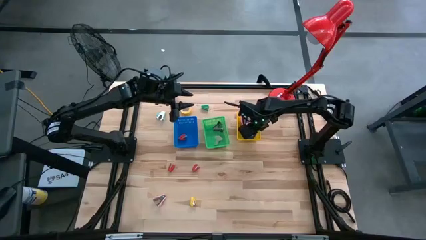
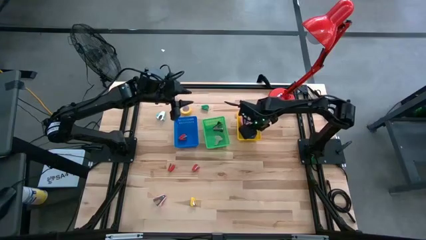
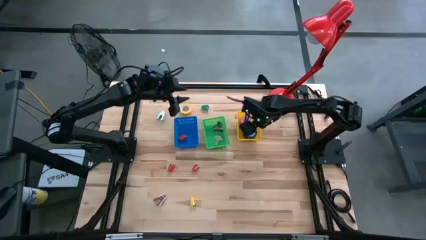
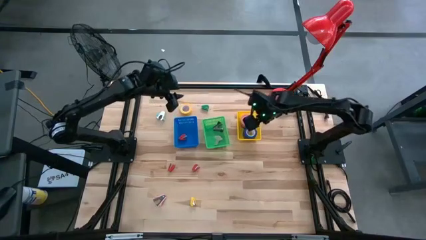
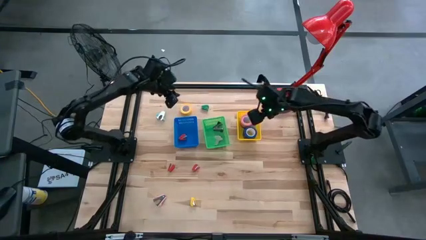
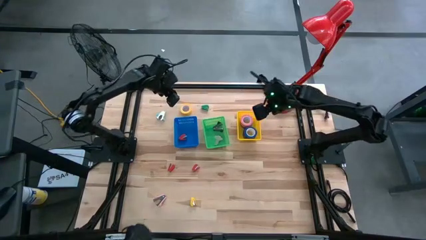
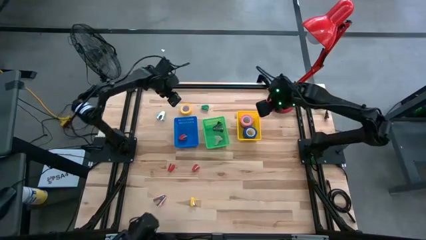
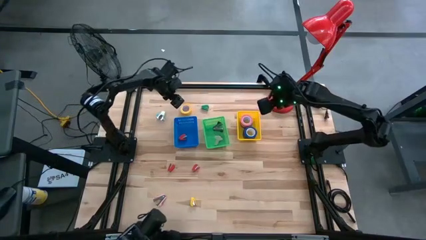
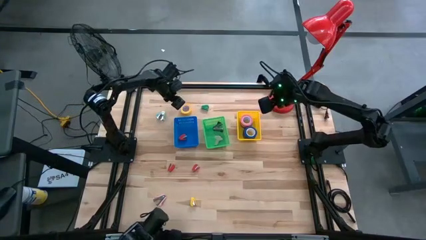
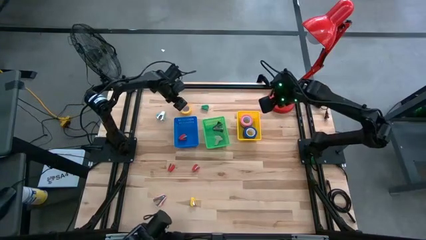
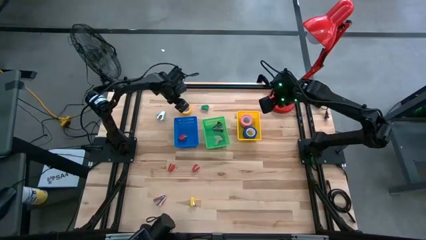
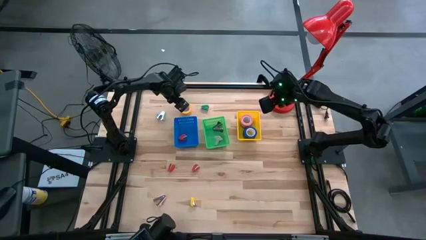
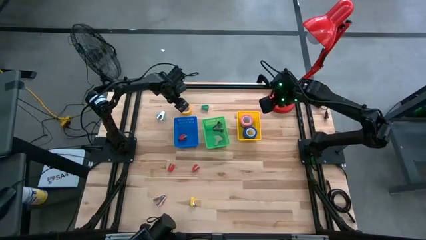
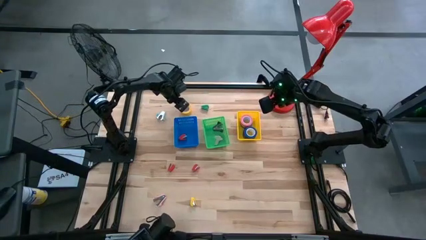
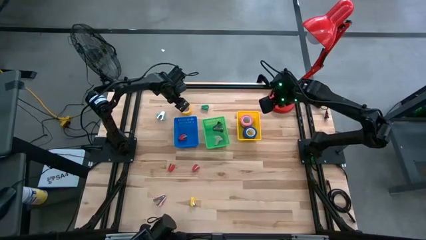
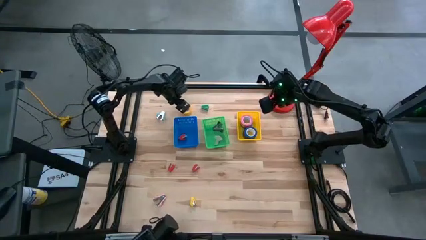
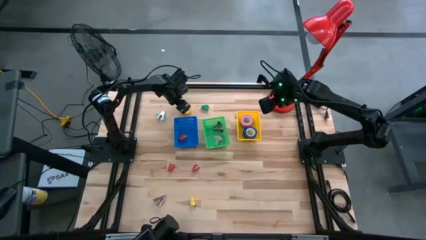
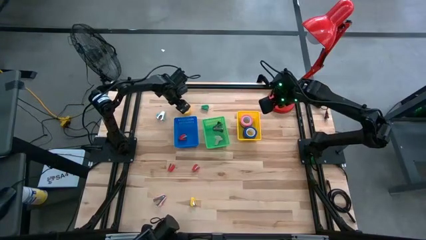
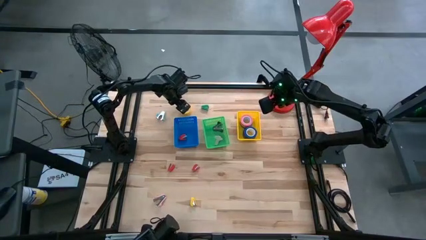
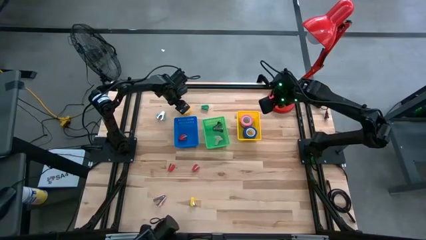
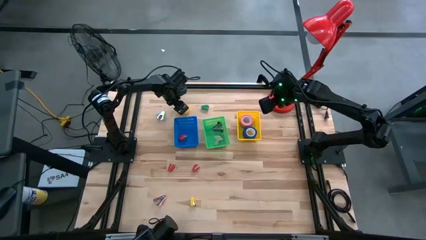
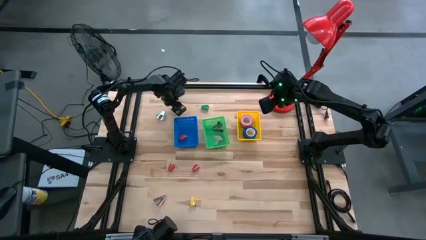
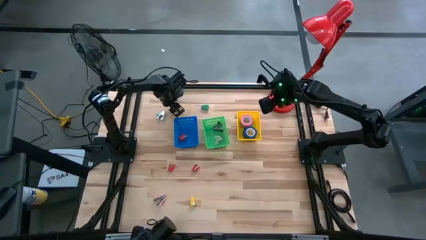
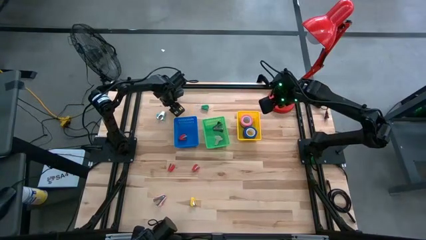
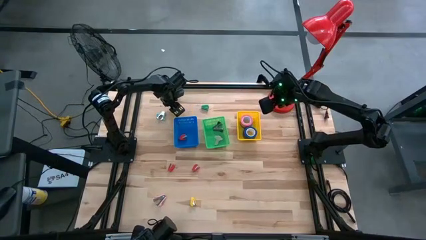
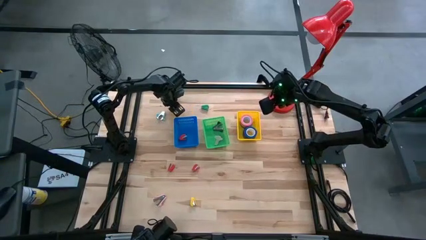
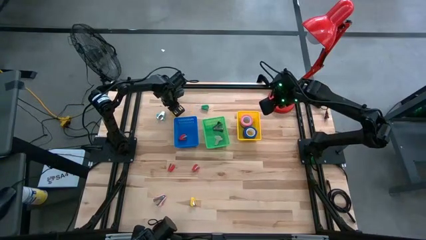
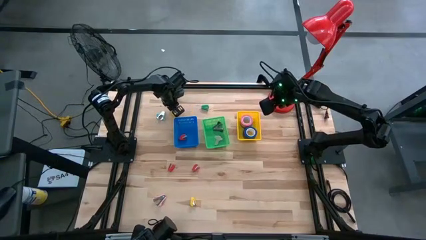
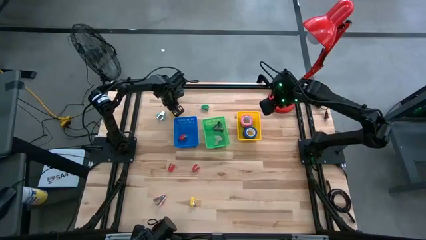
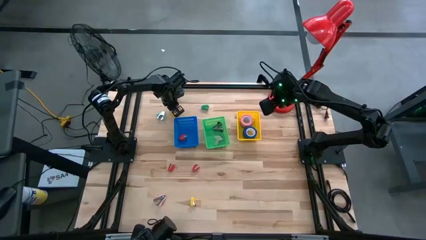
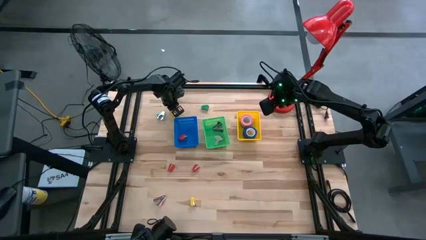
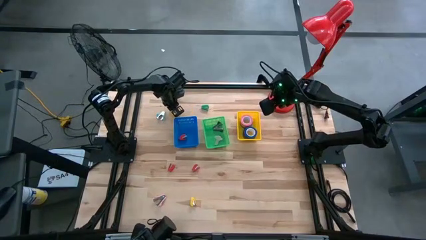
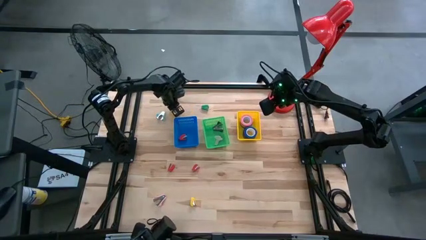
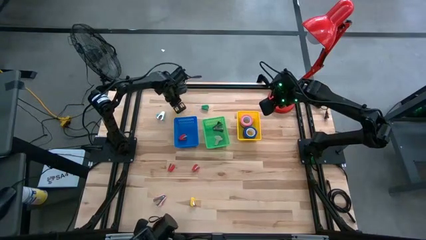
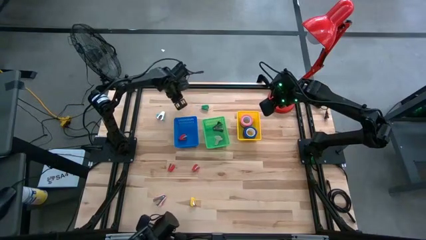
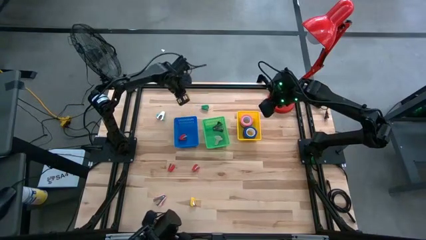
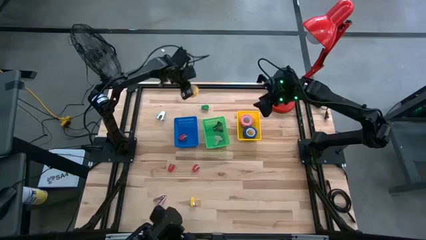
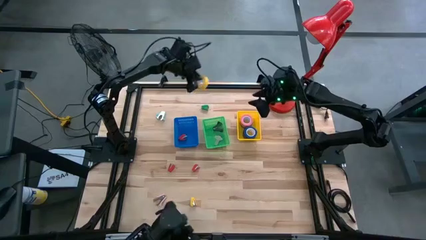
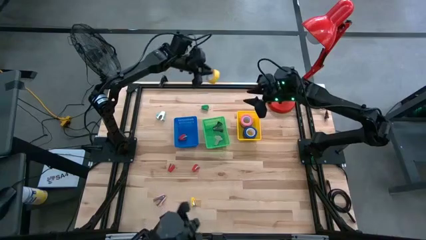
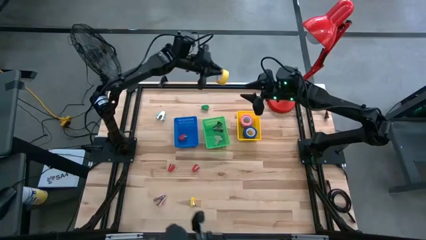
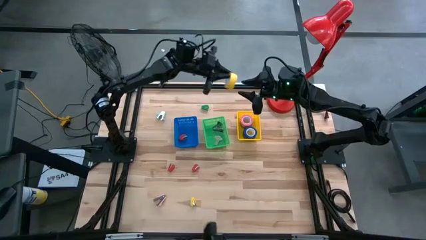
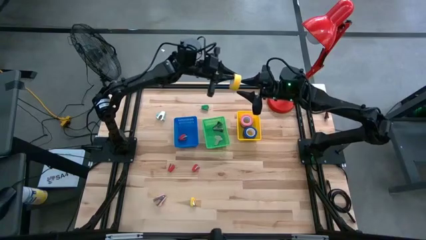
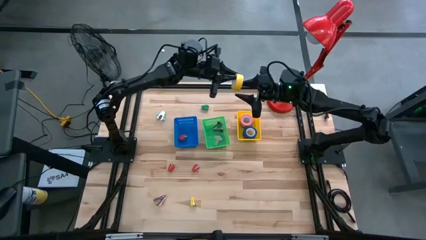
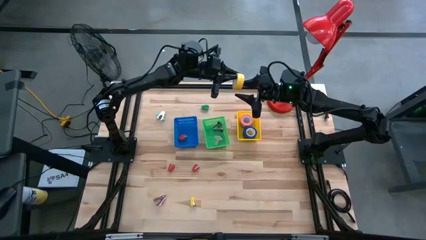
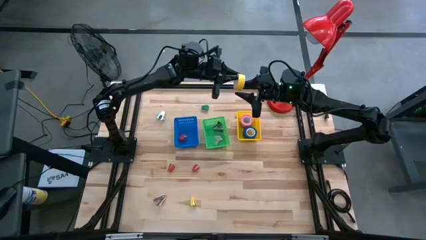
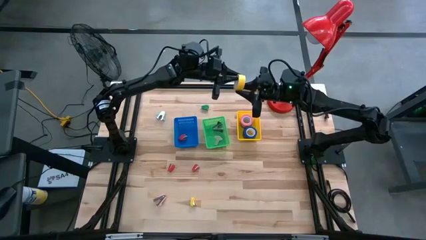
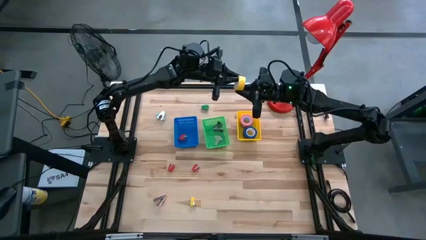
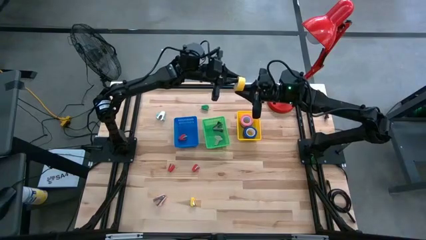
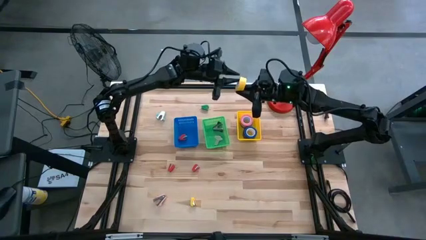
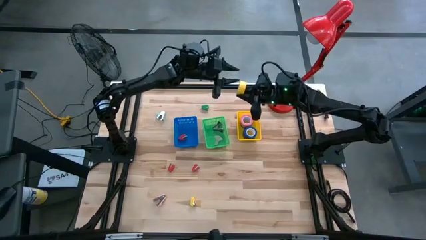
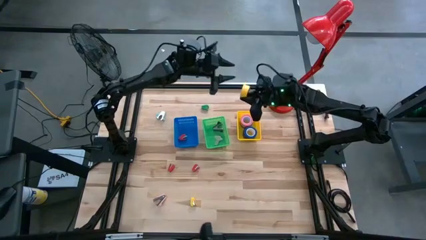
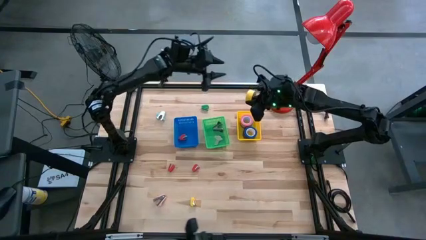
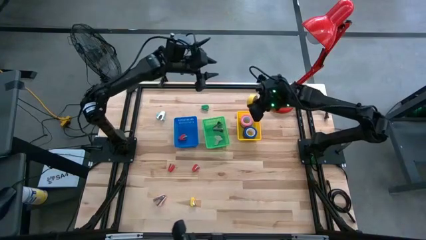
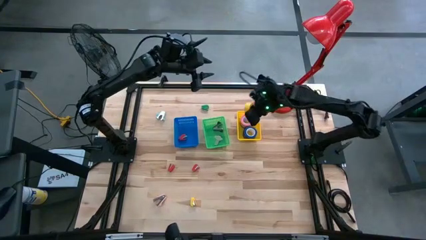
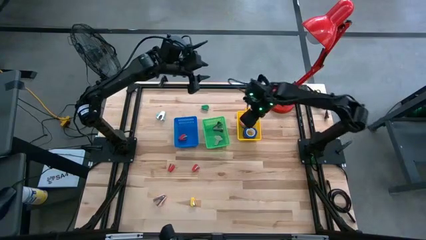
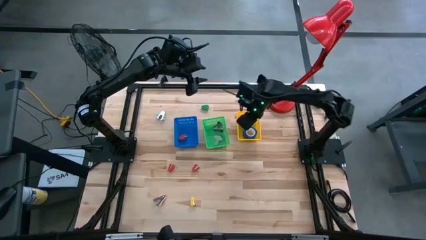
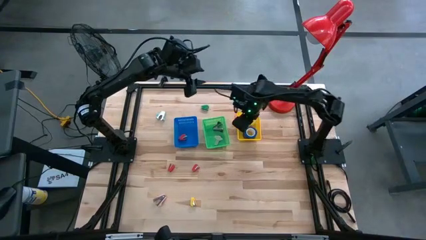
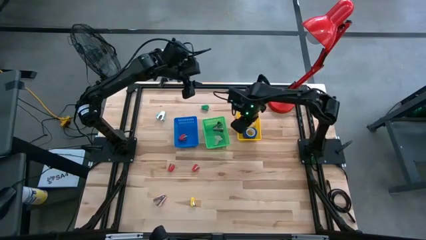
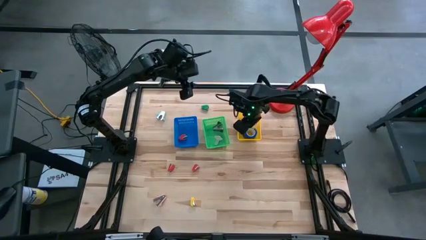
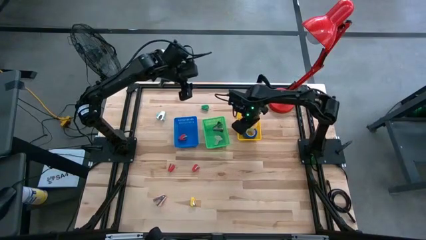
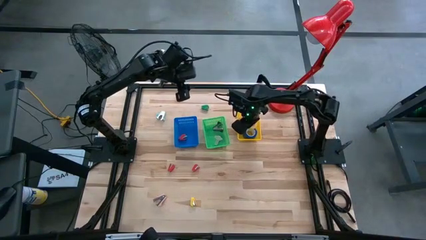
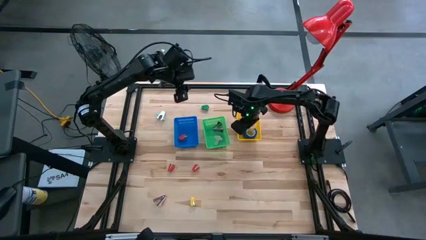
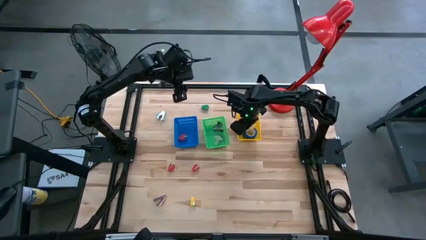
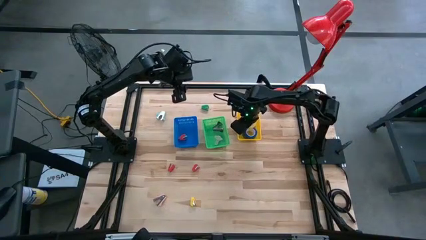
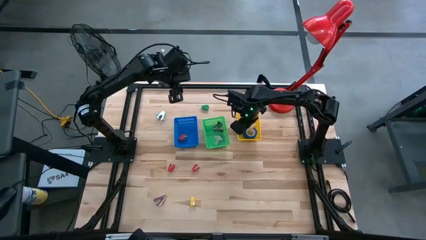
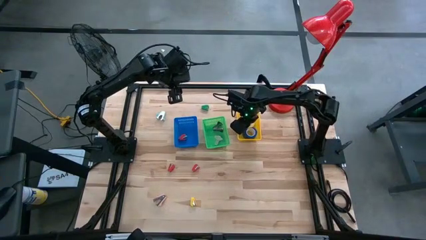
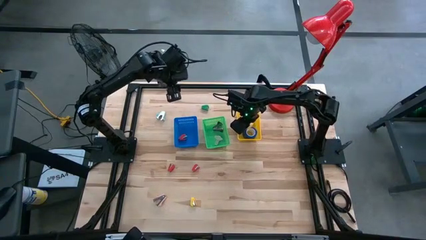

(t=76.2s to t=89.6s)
Task: Pick and place Stapler, Stapler remover, tape
Put the yellow tape into the yellow bin

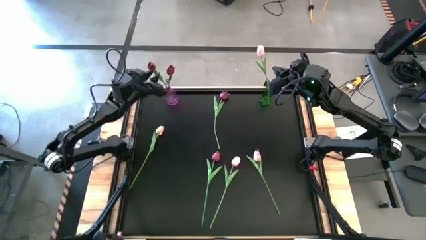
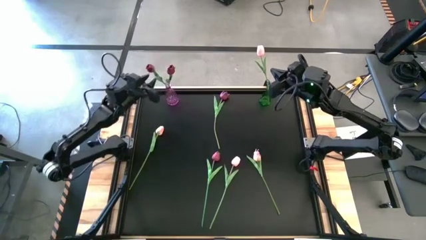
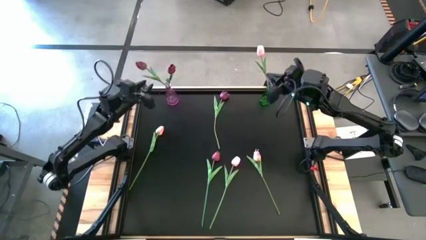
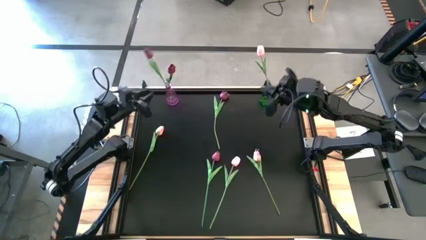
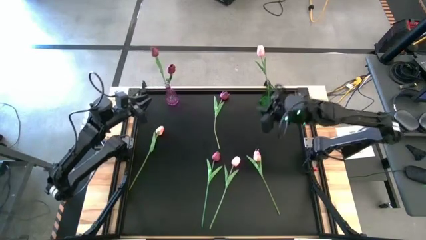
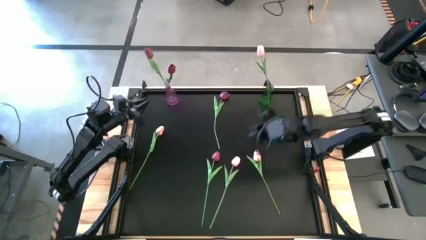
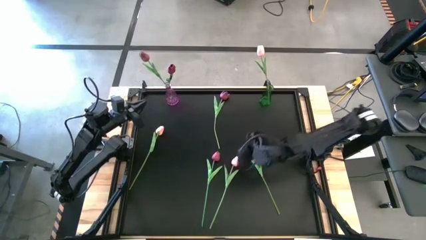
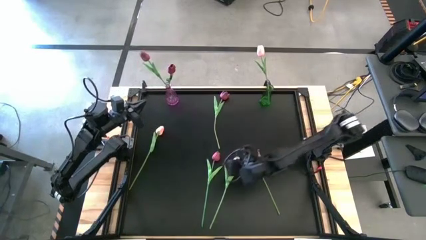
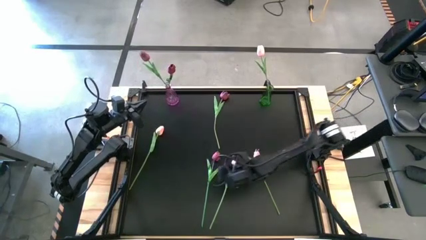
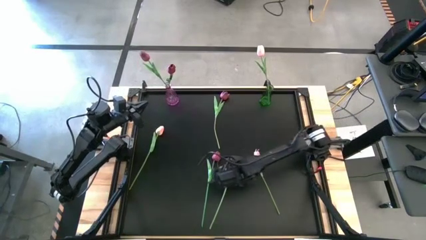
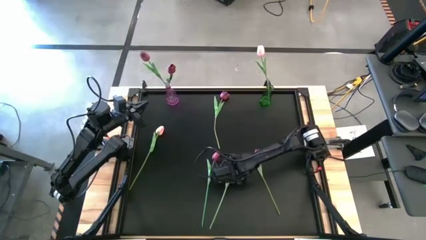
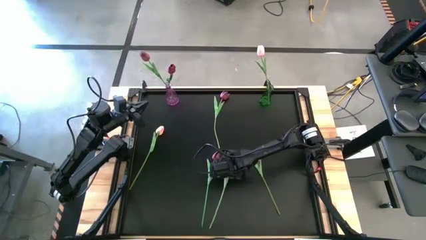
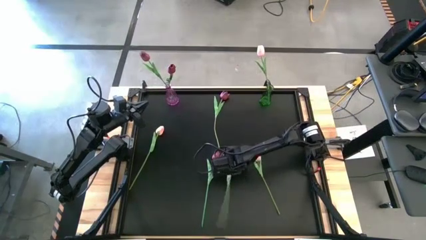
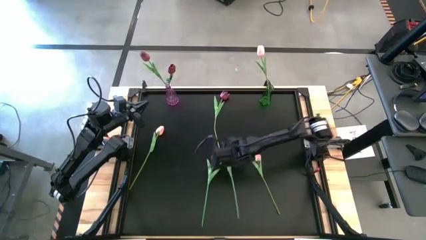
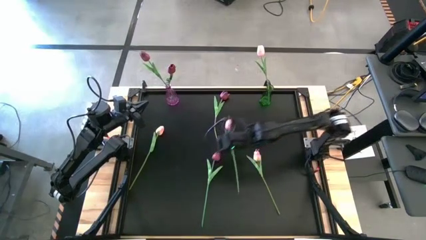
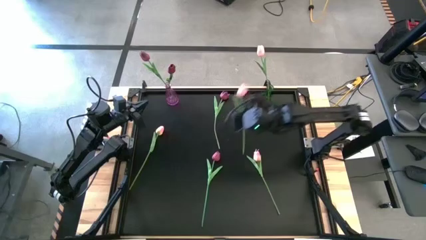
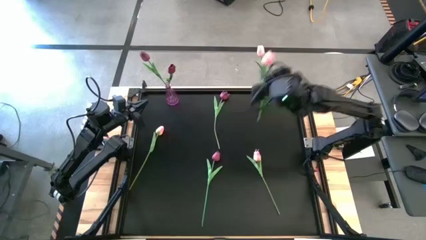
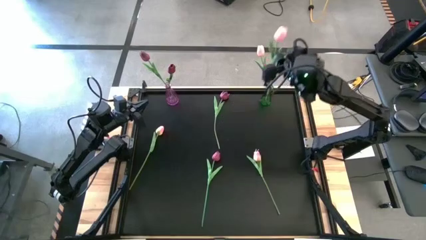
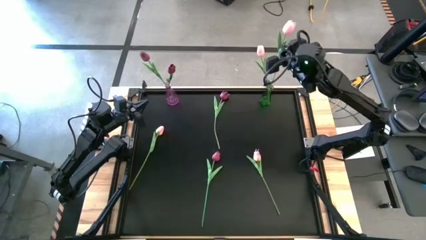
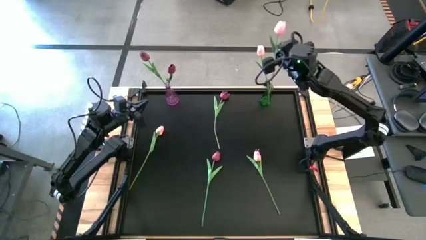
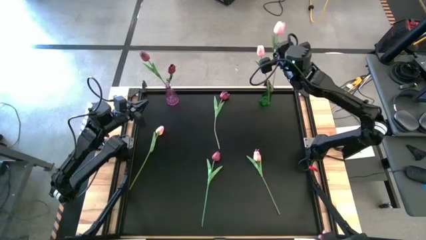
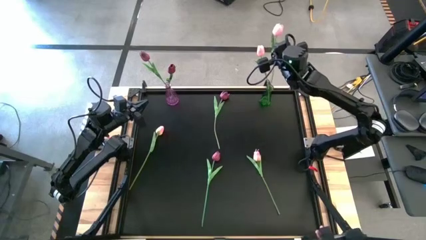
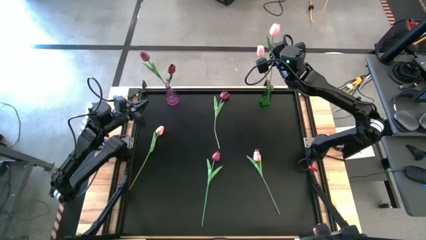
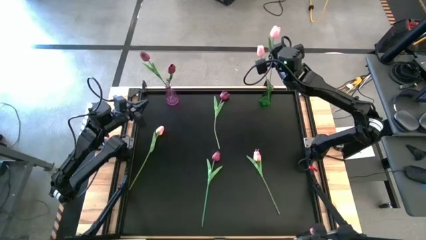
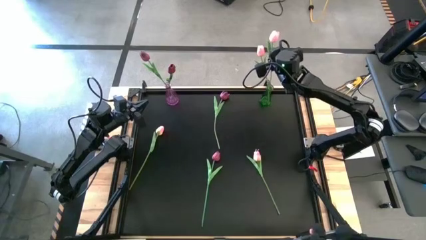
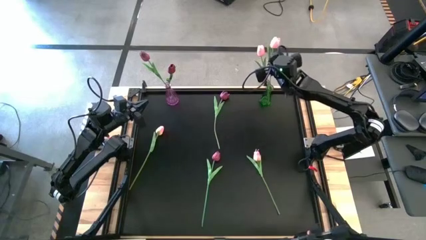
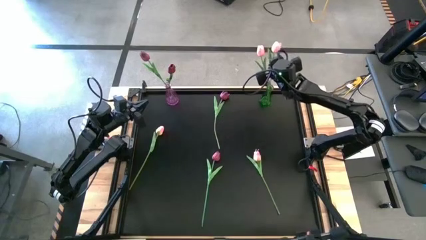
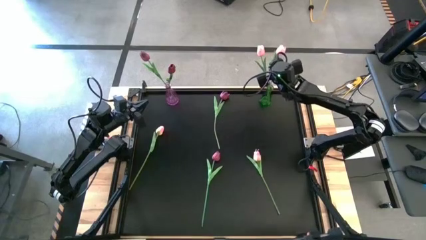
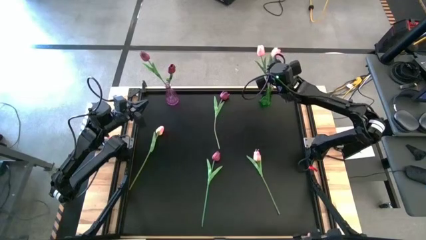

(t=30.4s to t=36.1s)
Task: Sort flowers into vase by color
Put the center pink flower into the green vase
